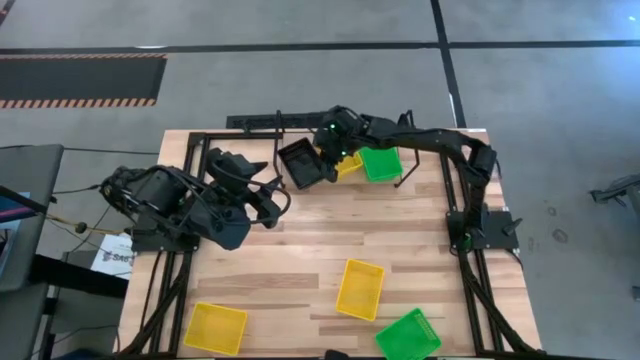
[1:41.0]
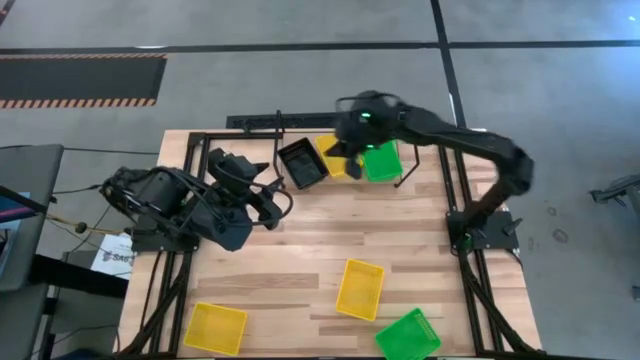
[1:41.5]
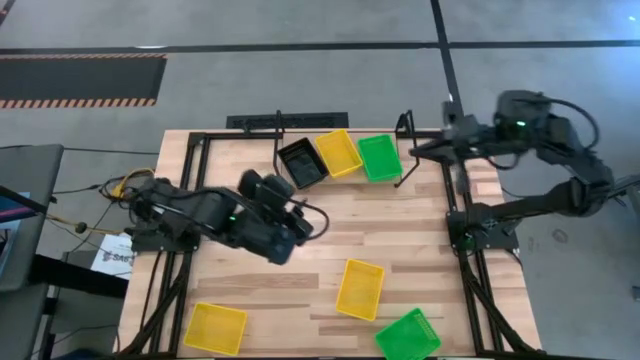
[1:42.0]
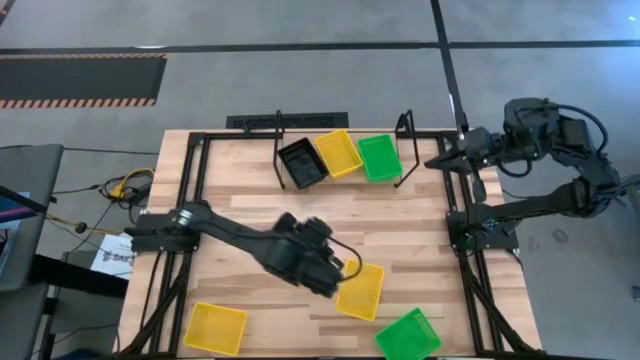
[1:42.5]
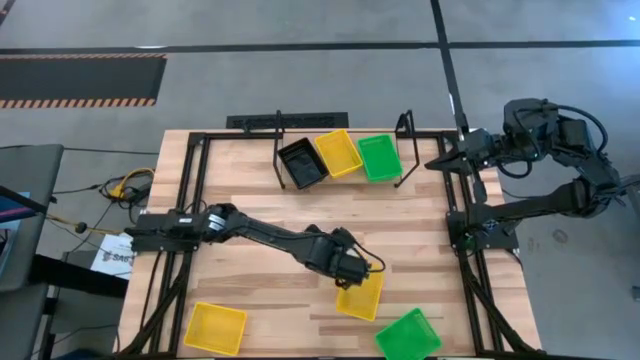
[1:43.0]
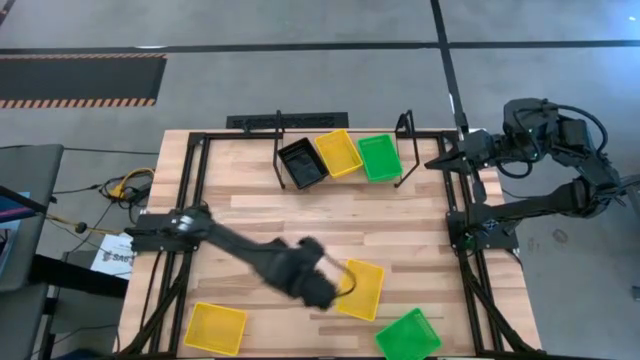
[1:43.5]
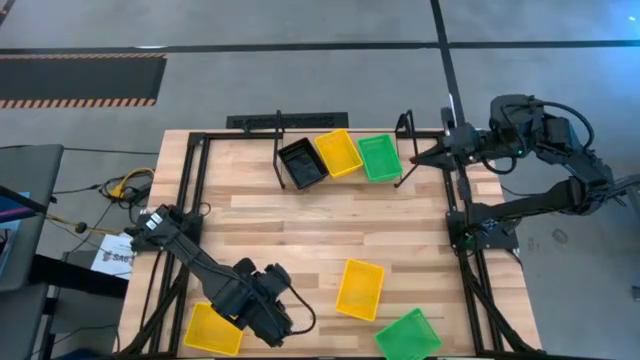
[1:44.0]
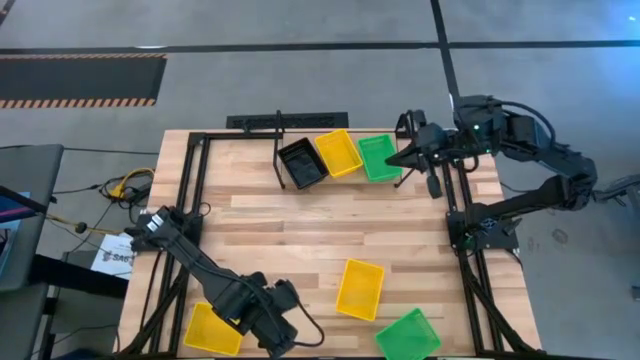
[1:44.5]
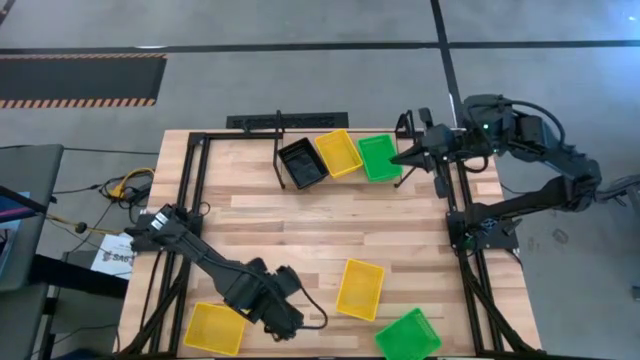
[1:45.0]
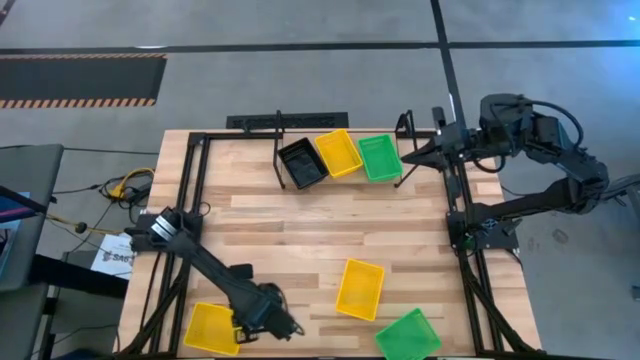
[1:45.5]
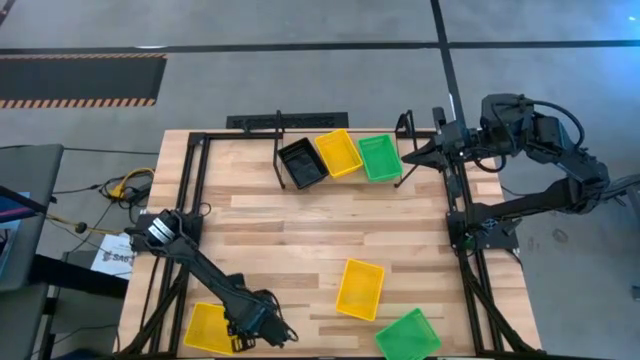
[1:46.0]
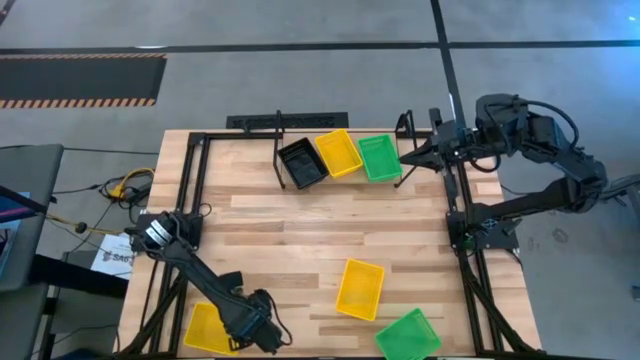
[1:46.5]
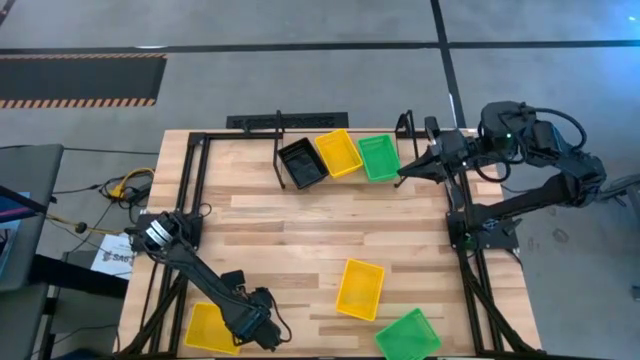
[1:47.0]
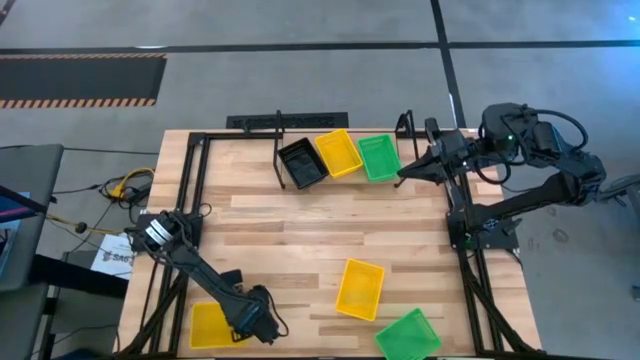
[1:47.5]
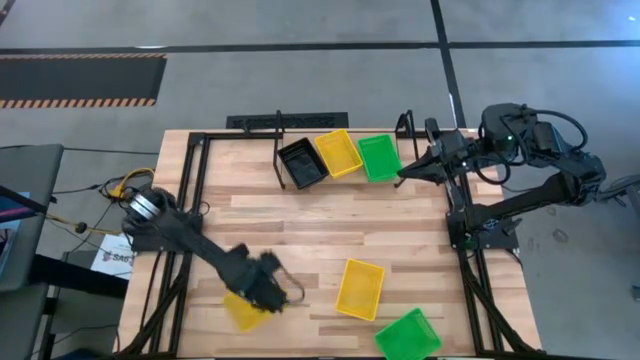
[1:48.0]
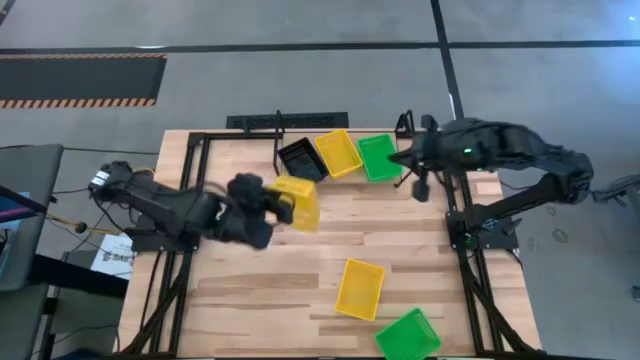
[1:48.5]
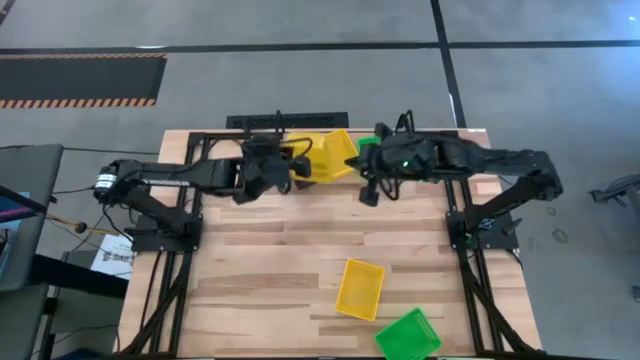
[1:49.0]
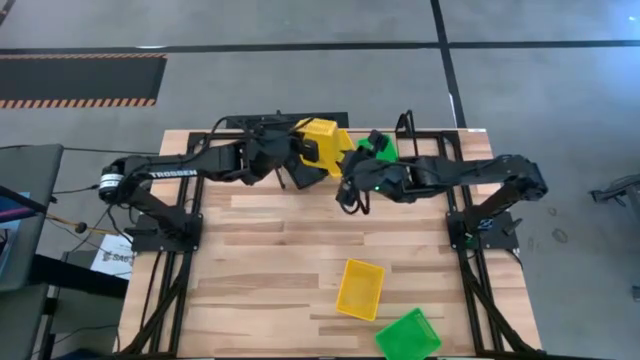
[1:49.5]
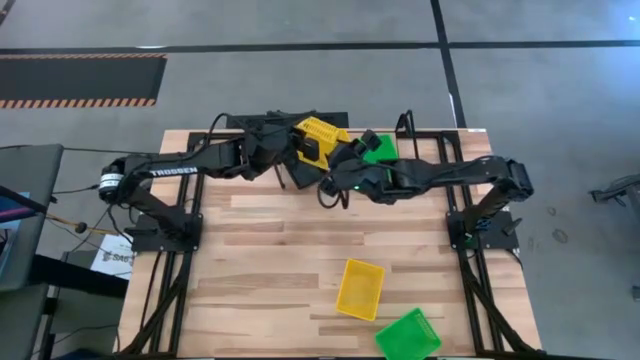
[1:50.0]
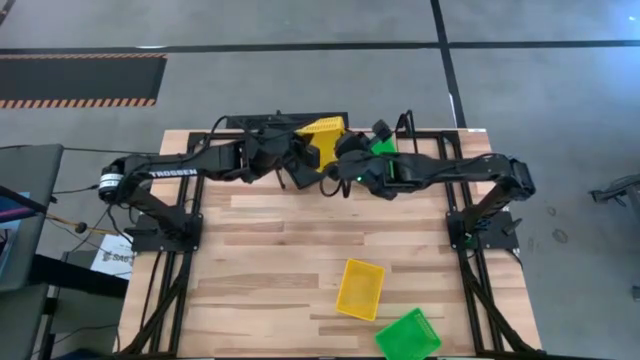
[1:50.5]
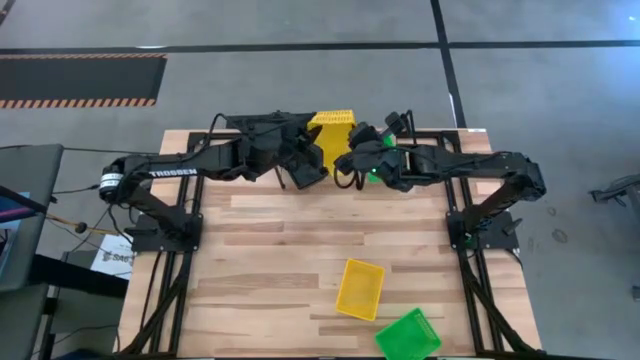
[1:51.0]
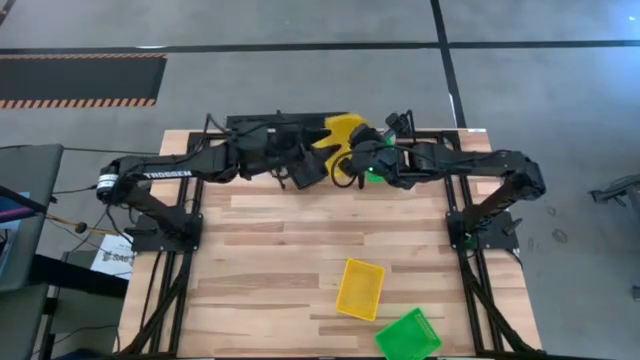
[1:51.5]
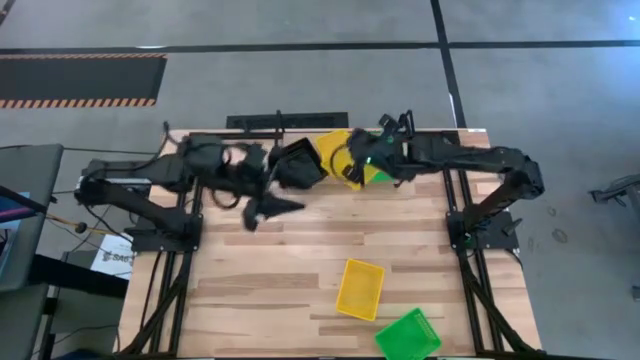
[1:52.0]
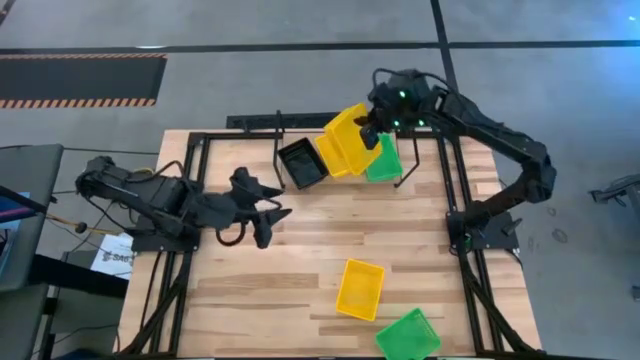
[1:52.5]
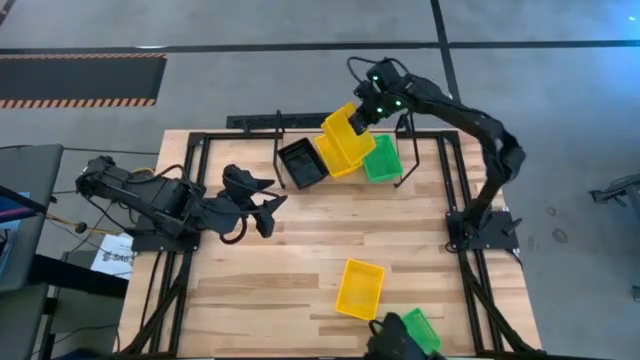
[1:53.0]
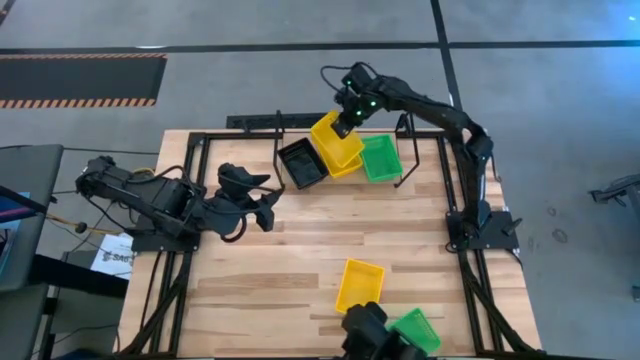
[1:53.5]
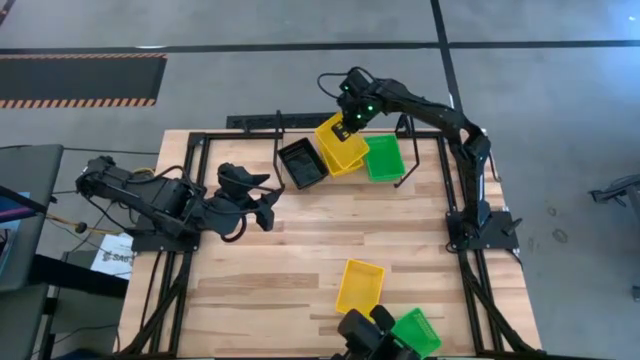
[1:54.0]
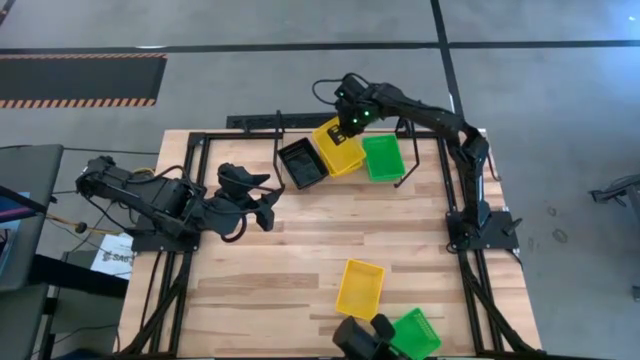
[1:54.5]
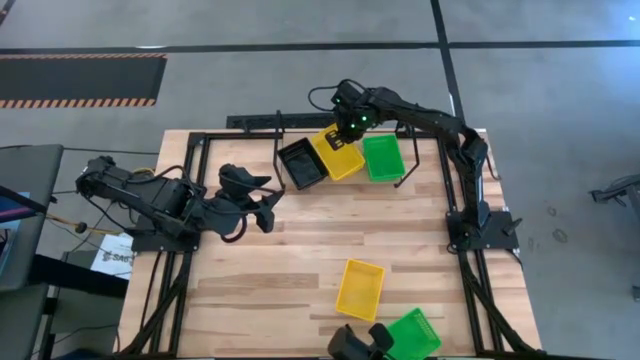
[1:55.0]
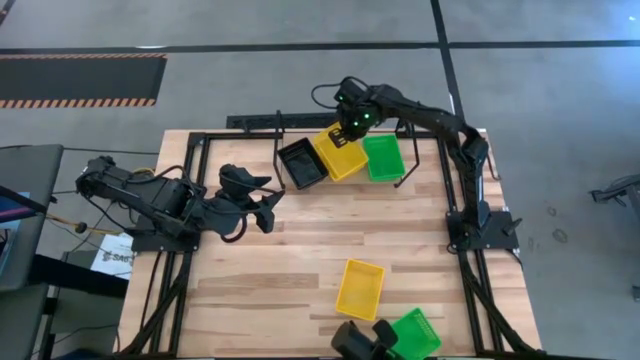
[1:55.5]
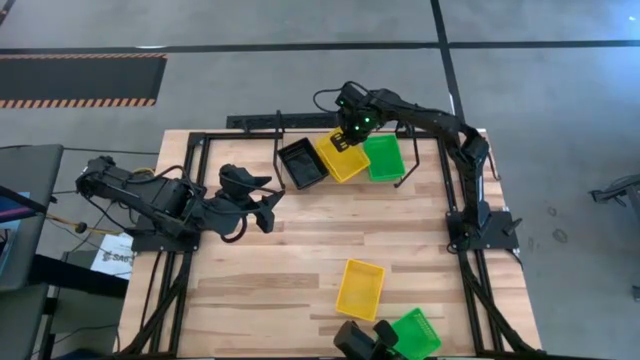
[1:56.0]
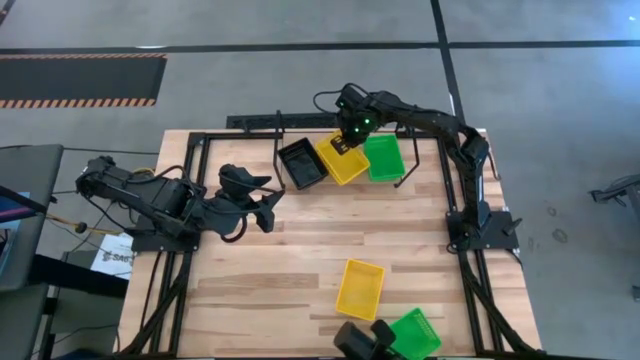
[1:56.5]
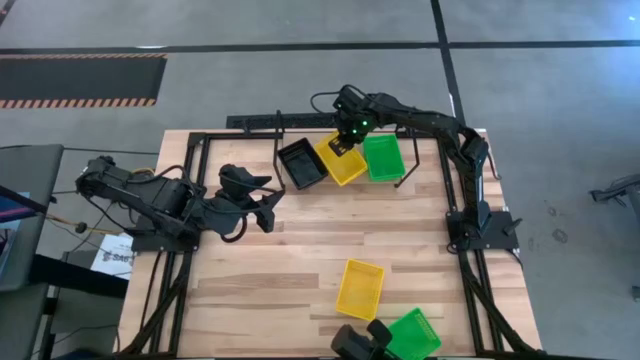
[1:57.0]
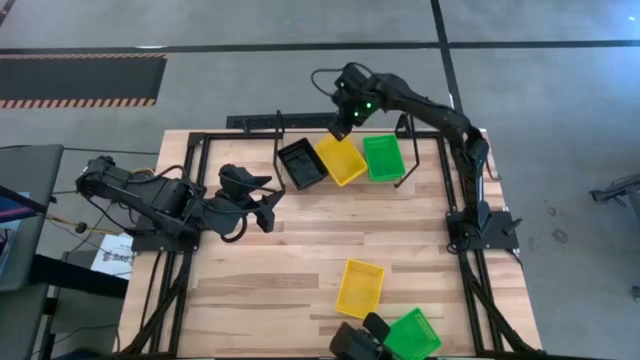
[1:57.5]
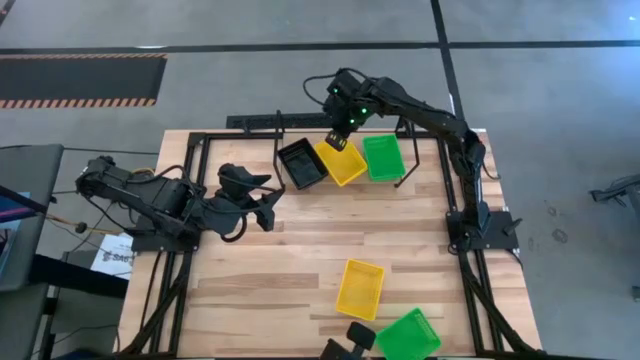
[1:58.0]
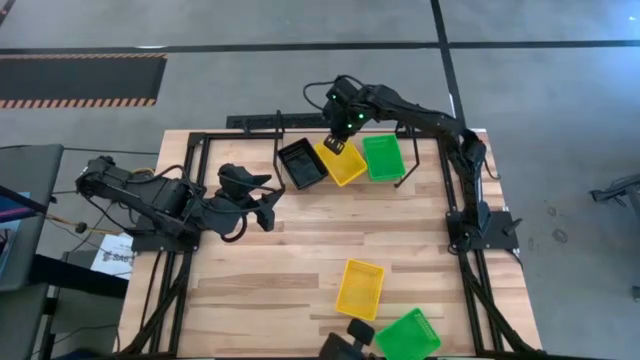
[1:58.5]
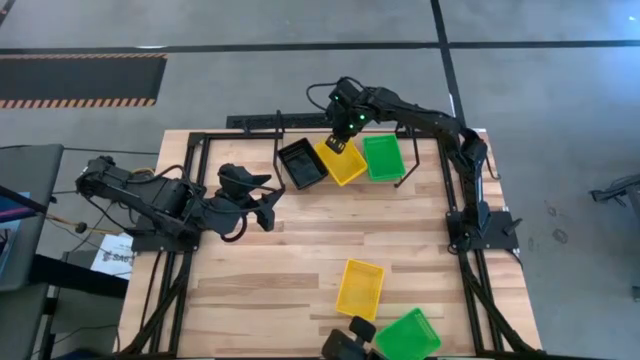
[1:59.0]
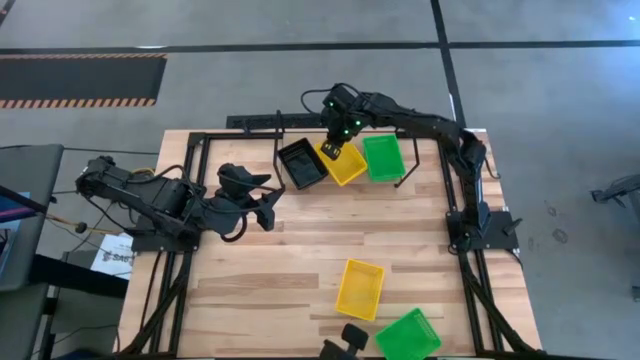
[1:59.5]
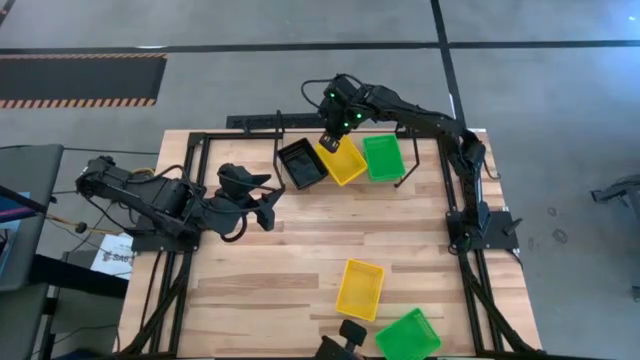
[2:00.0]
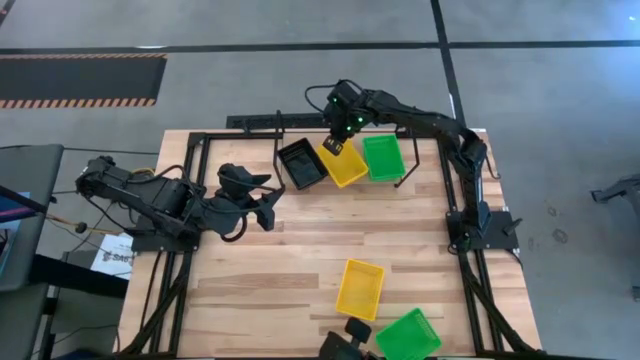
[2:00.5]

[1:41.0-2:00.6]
Task: Stack baskets on shelf by color
Stack the left yellow bin on top of the yellow bin on the shelf

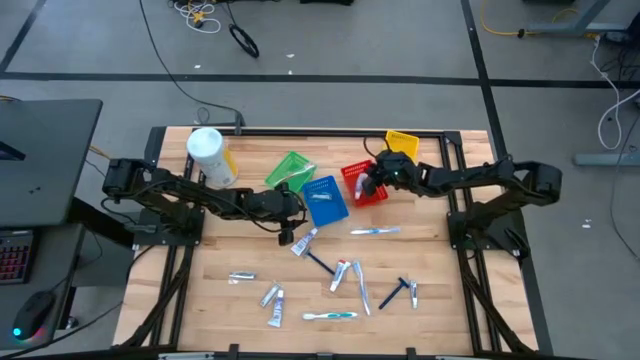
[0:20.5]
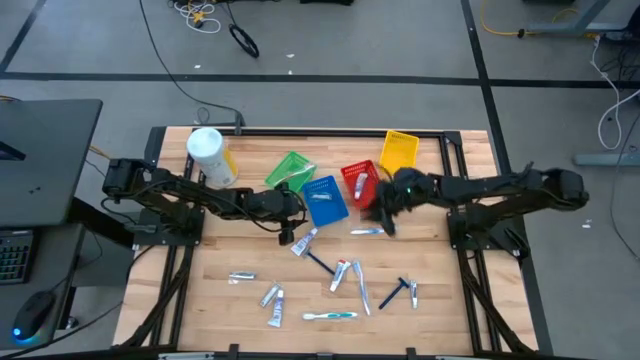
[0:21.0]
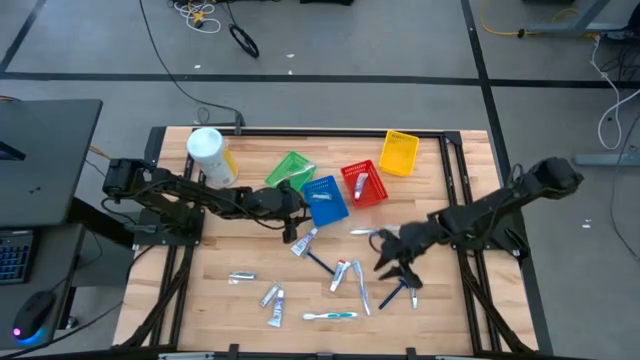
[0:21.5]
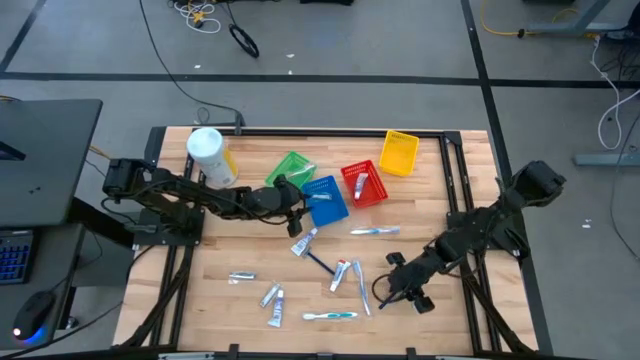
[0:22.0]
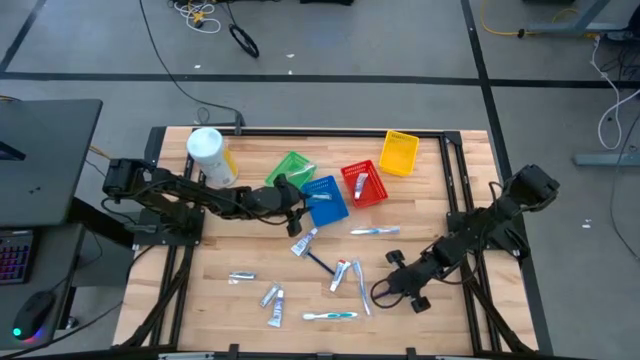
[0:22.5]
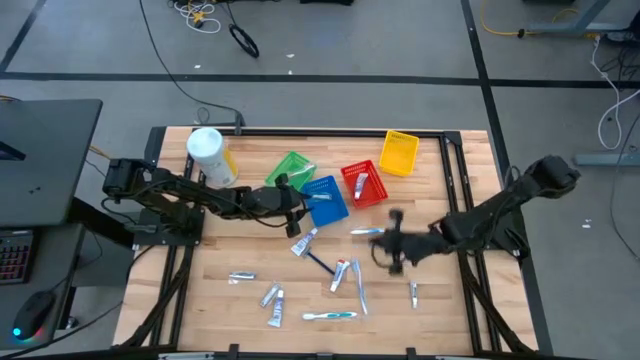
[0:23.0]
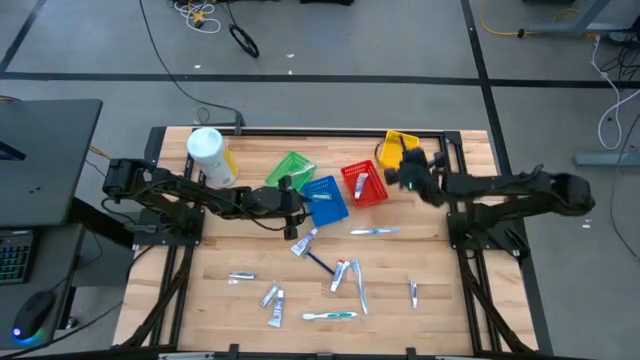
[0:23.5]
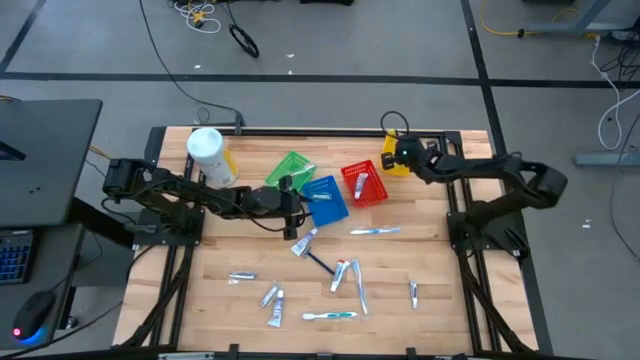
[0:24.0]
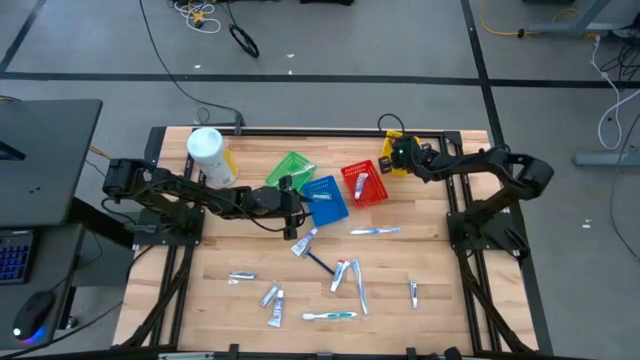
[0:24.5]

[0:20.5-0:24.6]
Task: Pick & Place Travel size toiletries
Put the right black razor into the yellow bin
